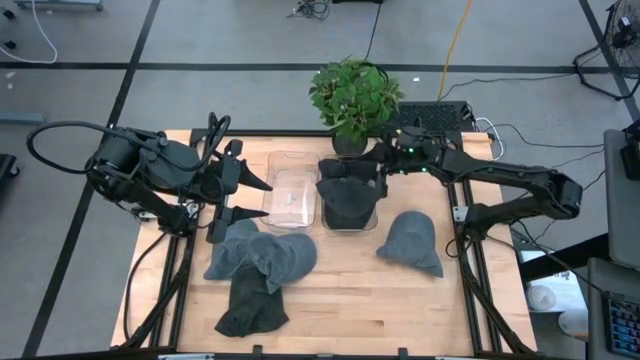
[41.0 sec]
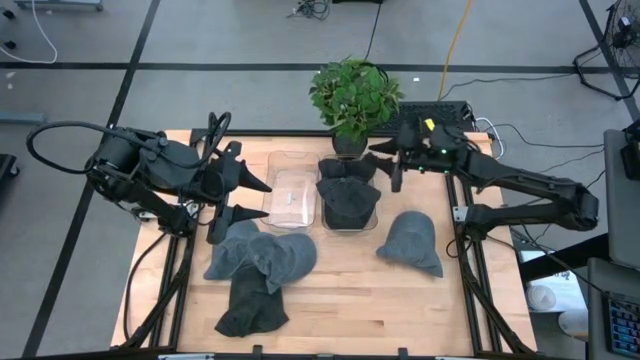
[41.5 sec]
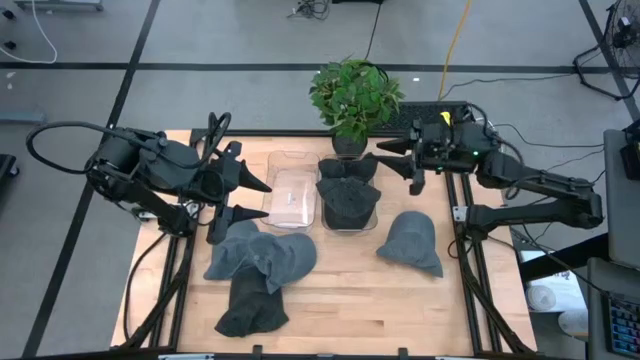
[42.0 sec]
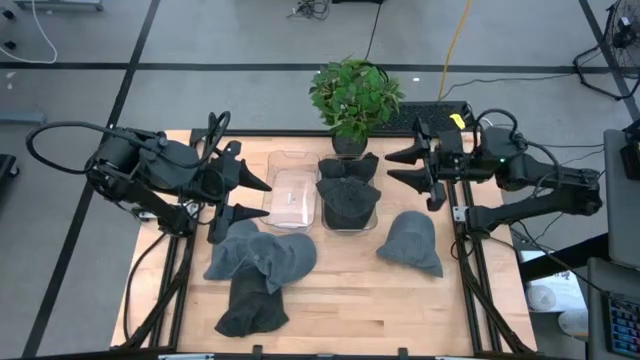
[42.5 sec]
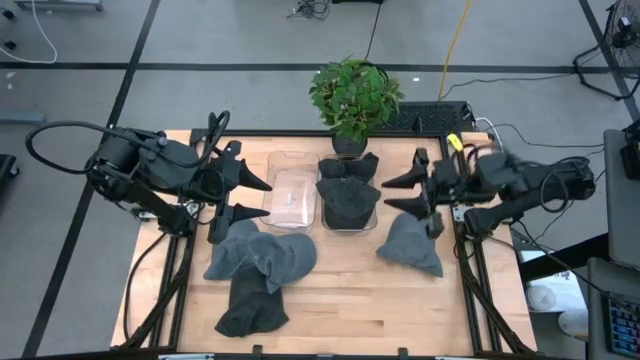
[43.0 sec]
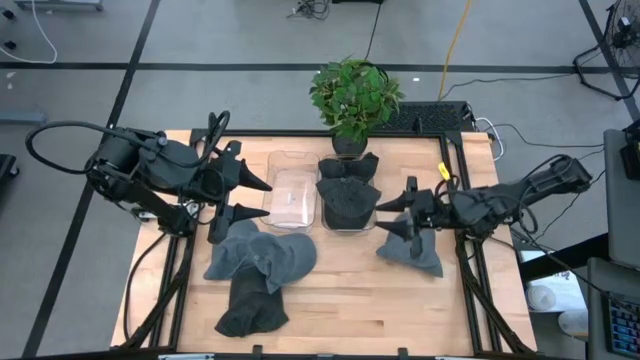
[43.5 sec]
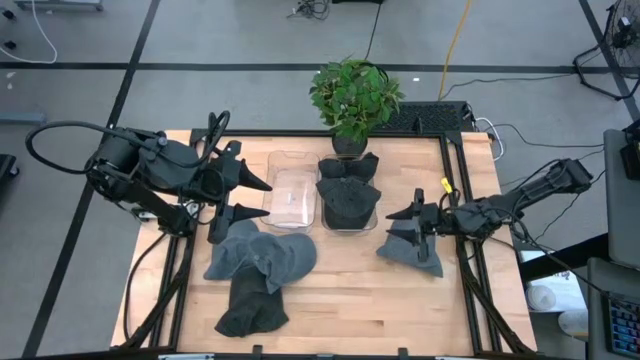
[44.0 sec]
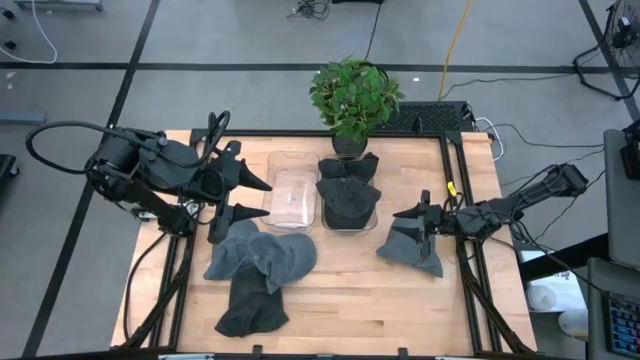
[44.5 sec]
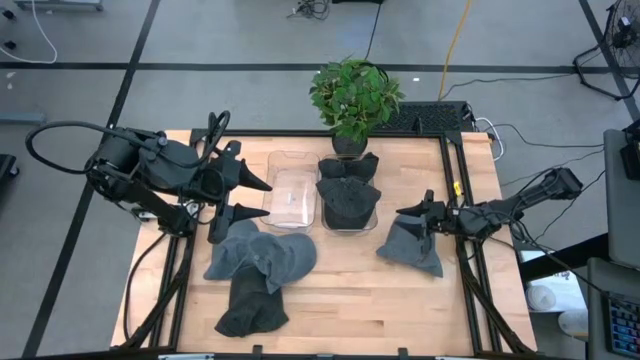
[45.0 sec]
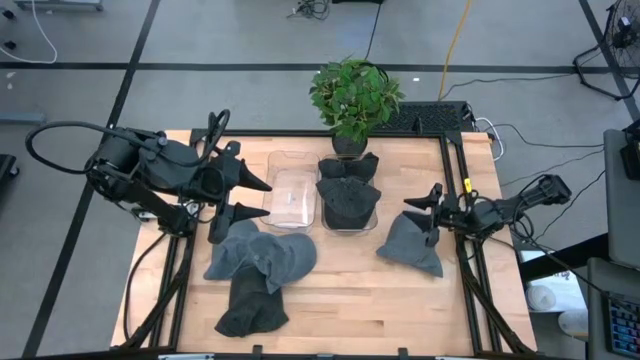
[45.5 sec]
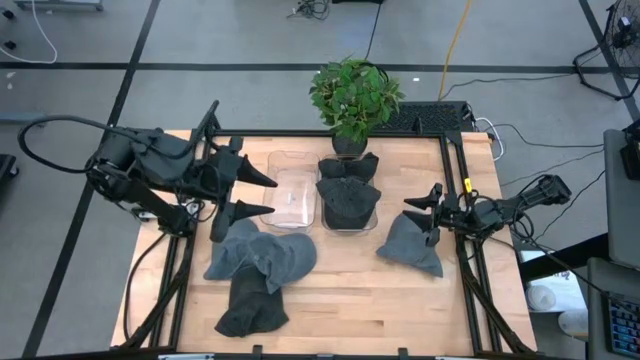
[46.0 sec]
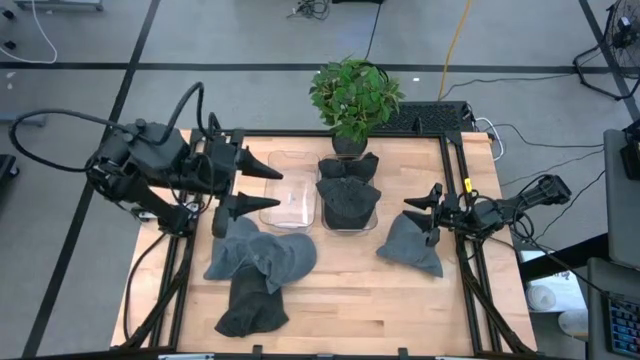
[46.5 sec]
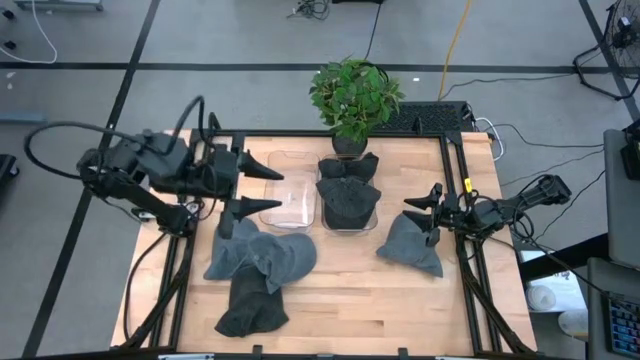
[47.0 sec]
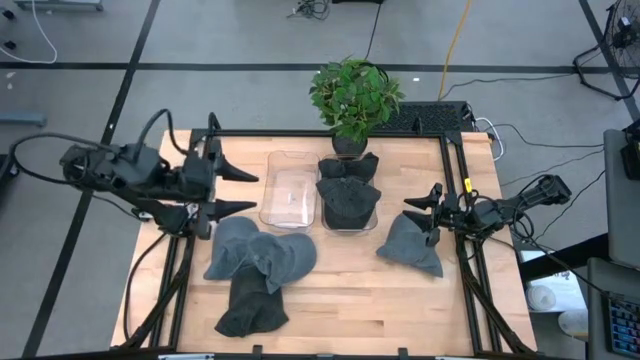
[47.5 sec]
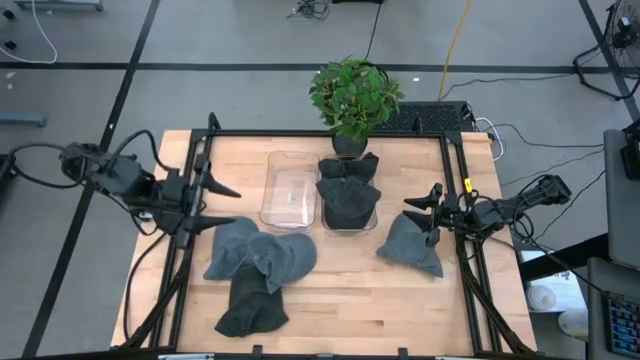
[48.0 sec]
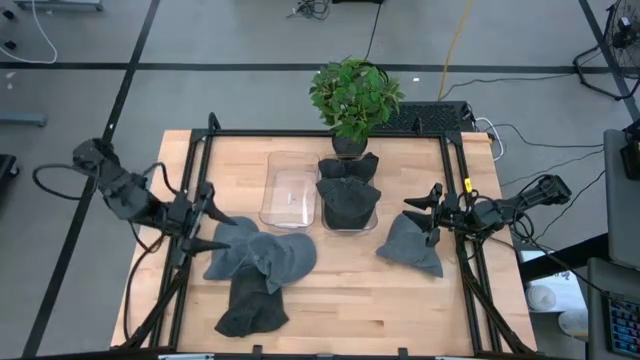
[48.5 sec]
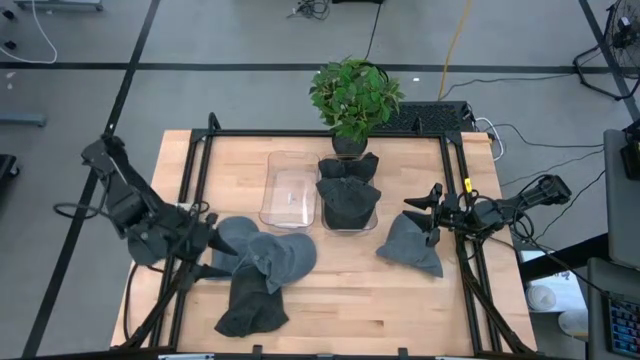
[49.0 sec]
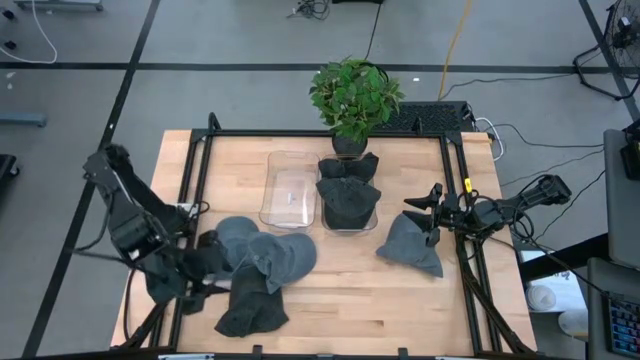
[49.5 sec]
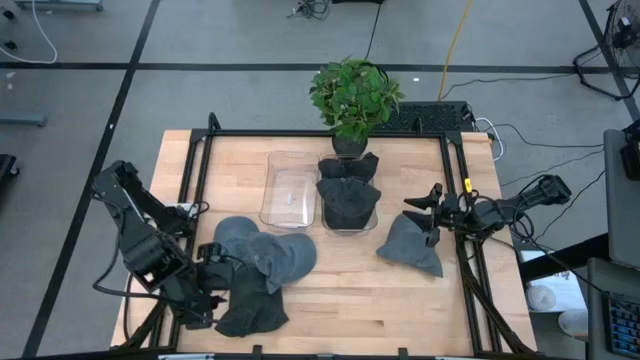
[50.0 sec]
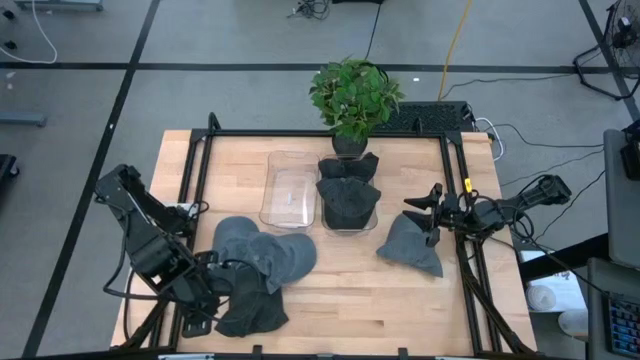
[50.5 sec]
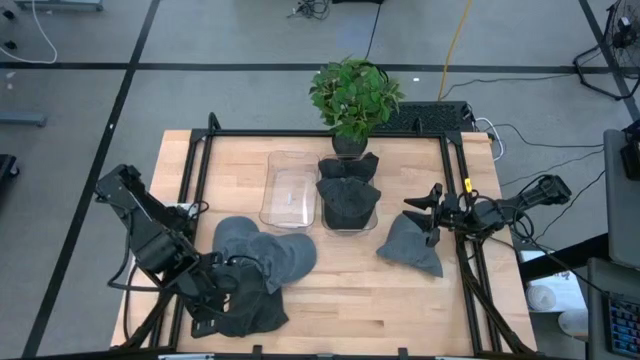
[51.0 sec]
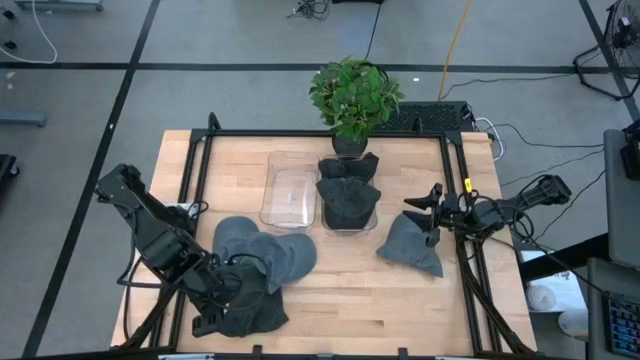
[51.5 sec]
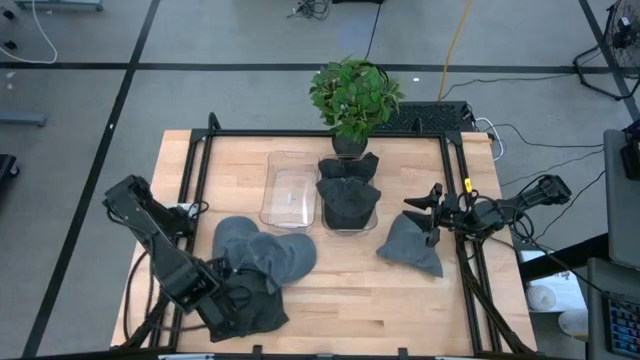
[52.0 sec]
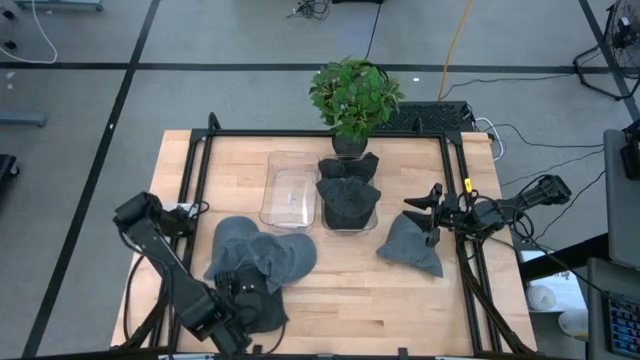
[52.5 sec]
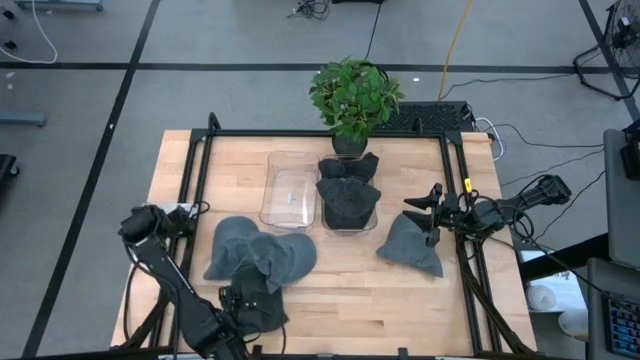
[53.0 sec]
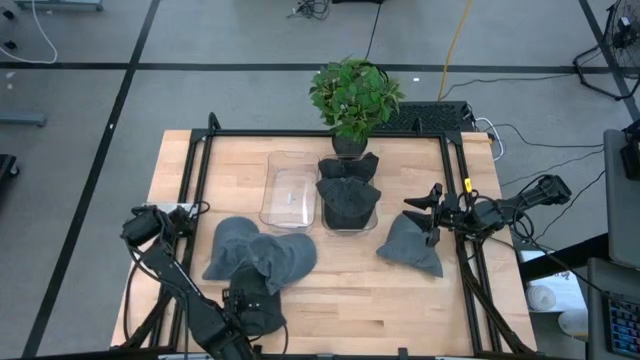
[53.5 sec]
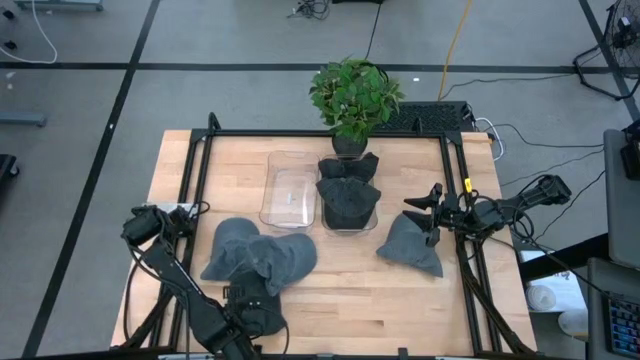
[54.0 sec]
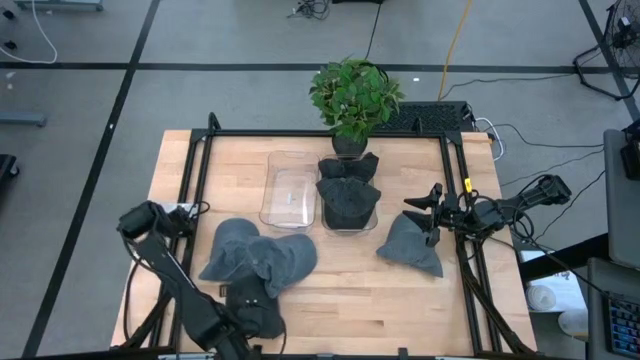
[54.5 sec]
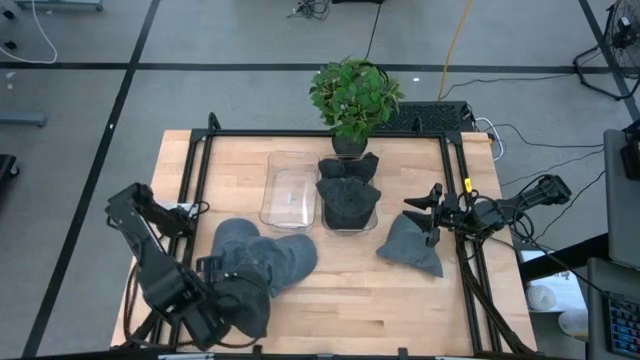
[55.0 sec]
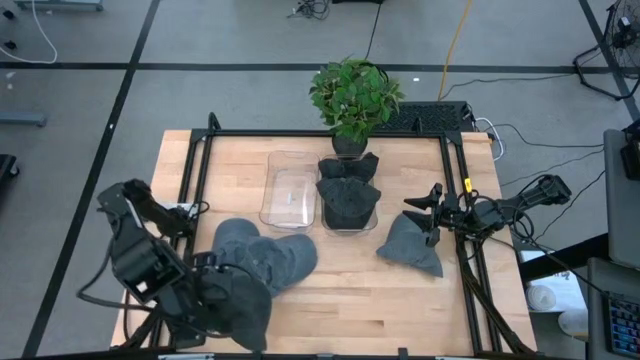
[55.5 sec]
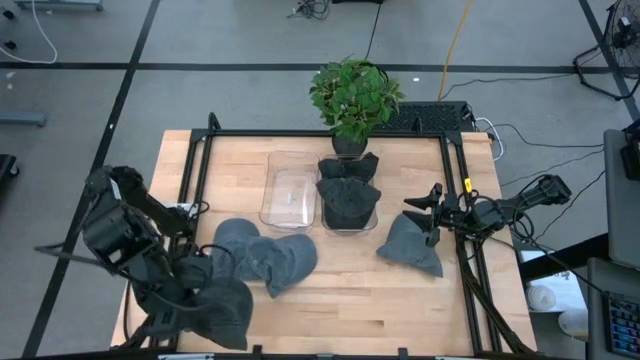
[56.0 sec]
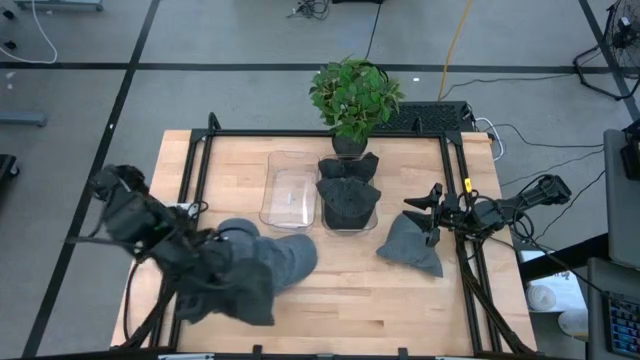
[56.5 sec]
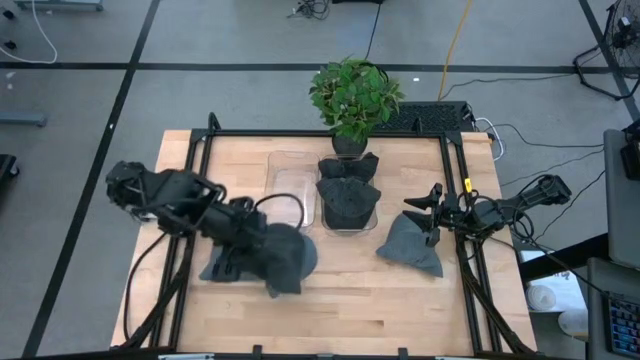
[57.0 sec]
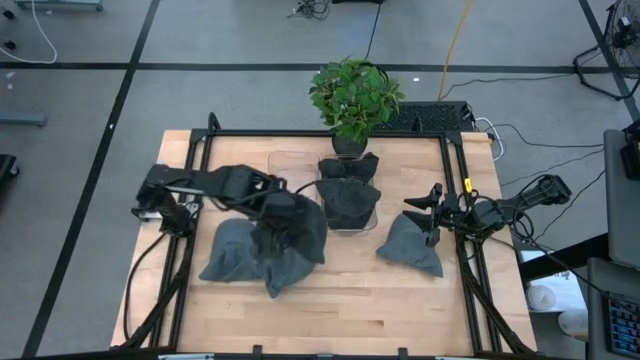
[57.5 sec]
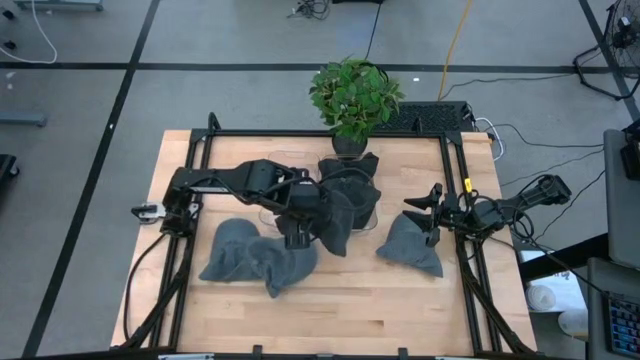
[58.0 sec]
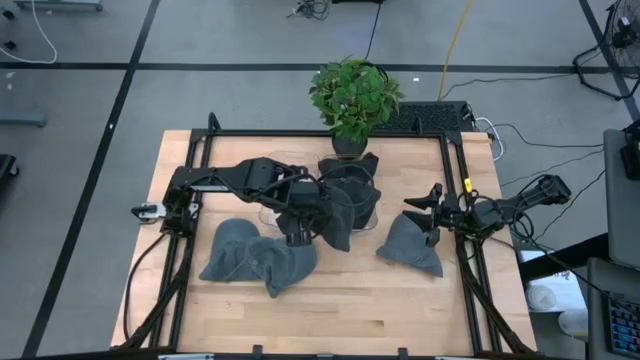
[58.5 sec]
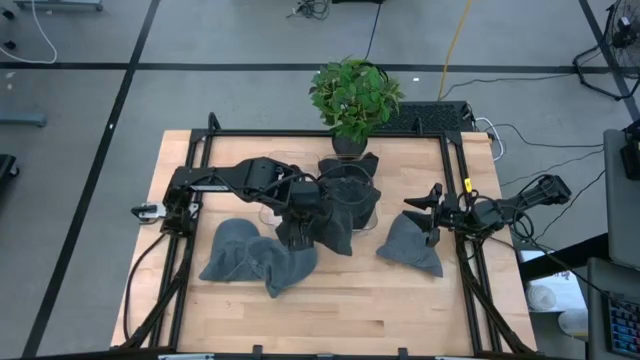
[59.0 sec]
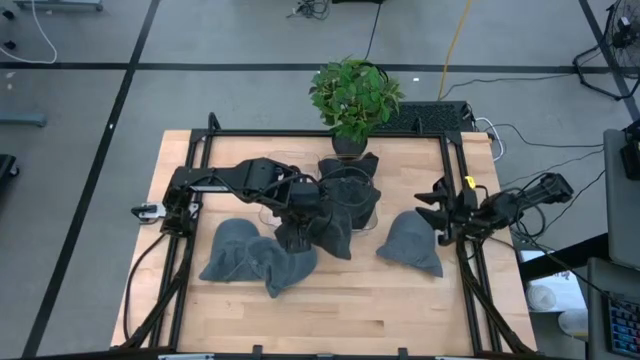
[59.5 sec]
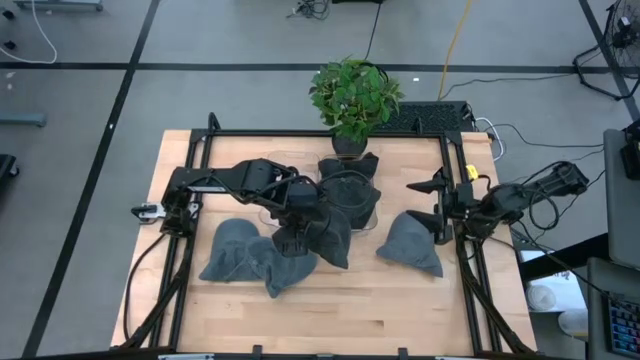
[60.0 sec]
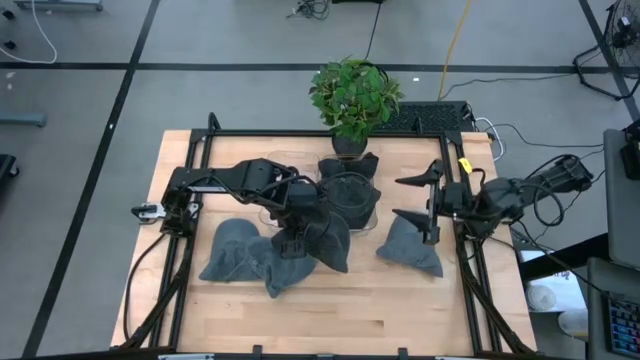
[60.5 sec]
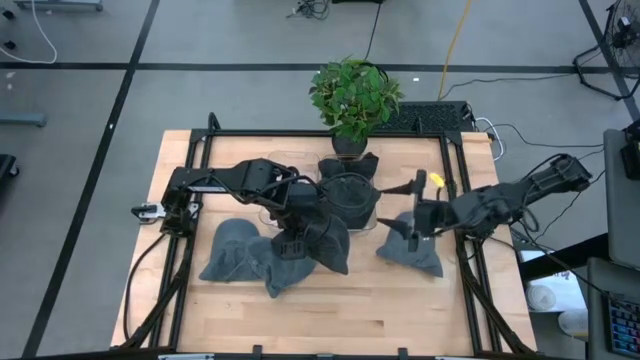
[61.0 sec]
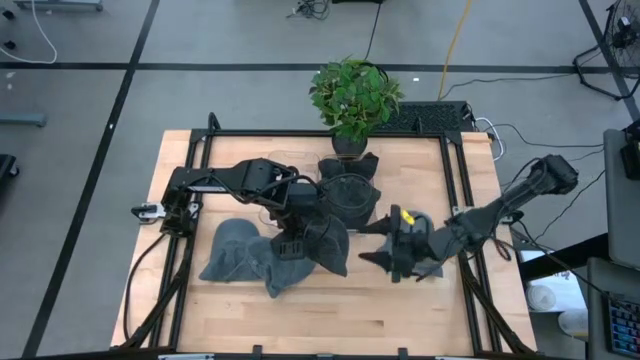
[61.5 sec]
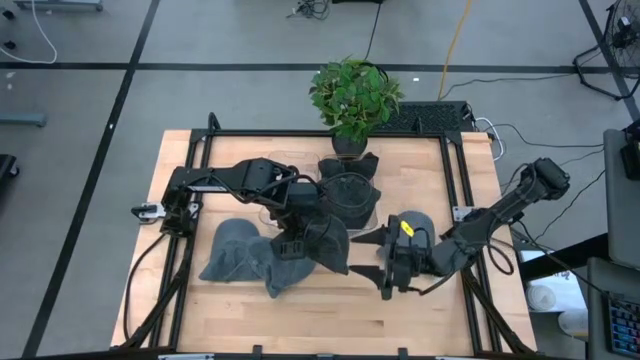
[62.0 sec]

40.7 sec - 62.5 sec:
Task: Pick & Place hat
Put the black cap into the right transparent bin
